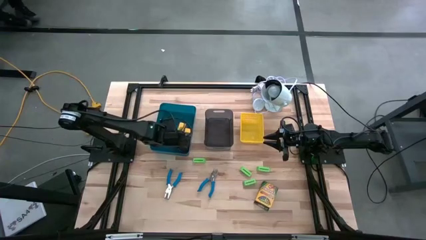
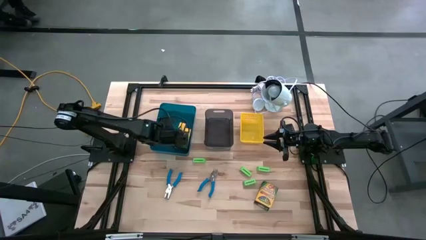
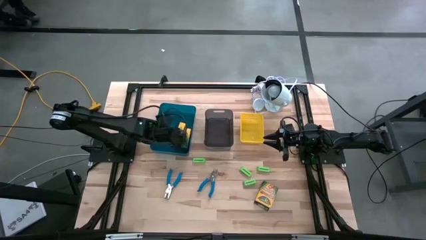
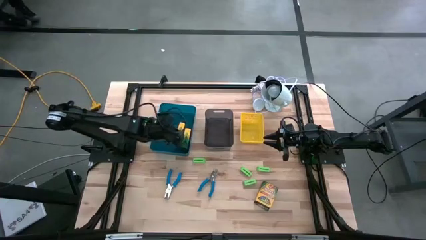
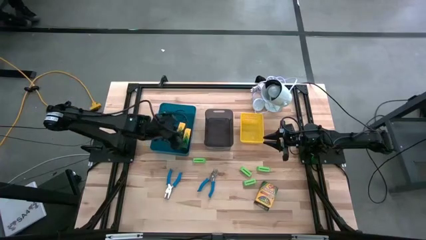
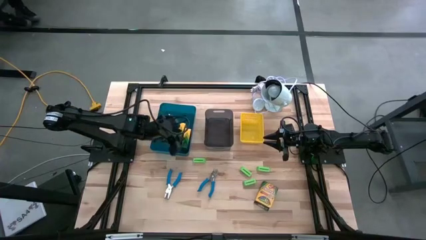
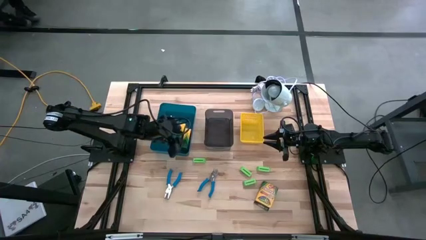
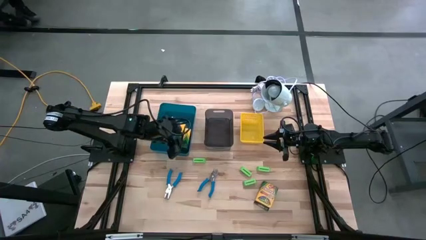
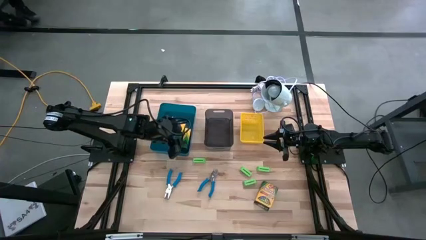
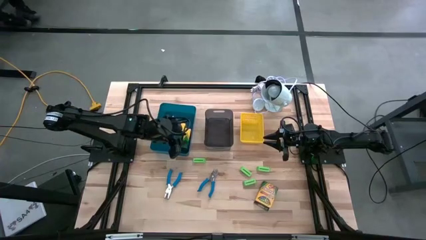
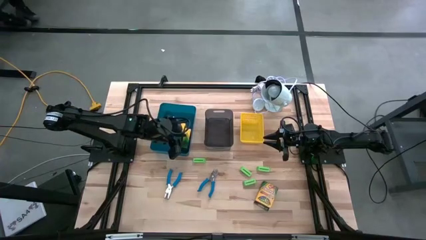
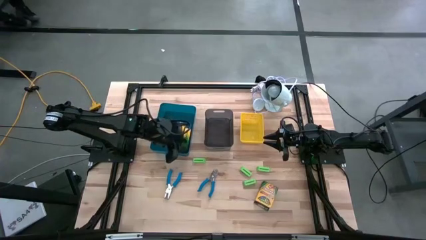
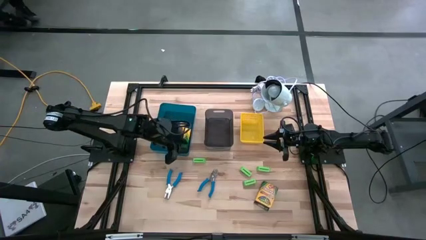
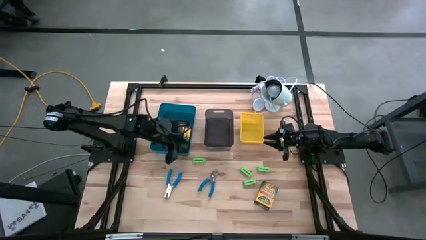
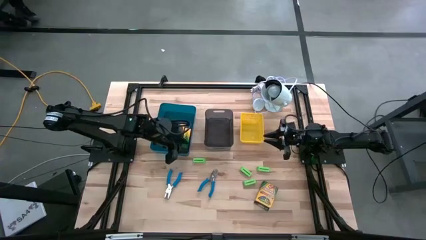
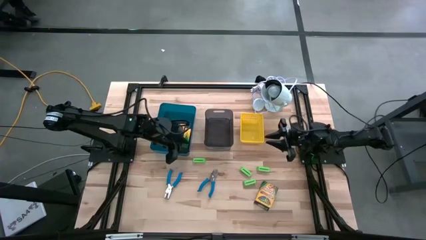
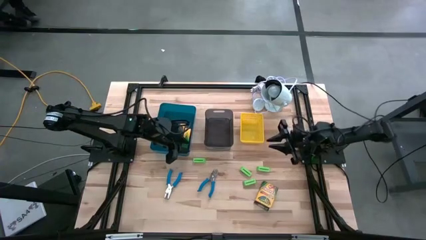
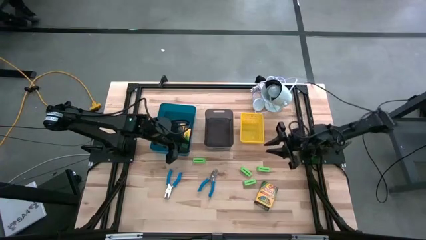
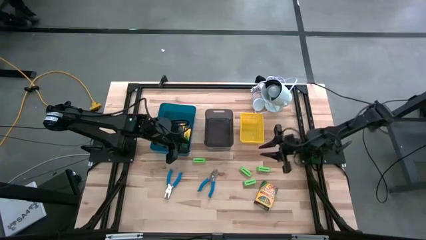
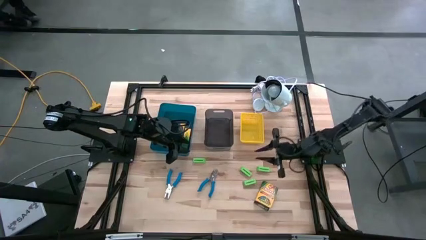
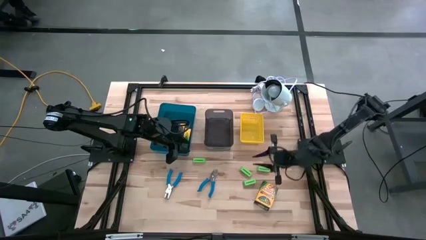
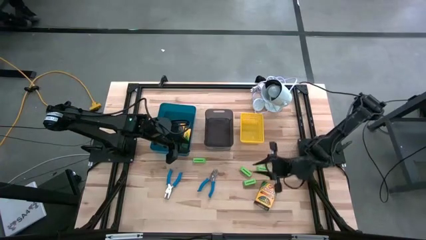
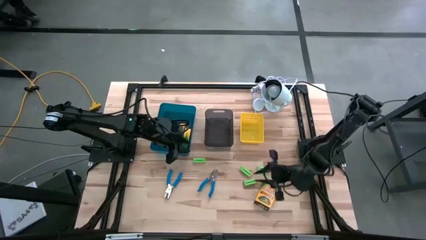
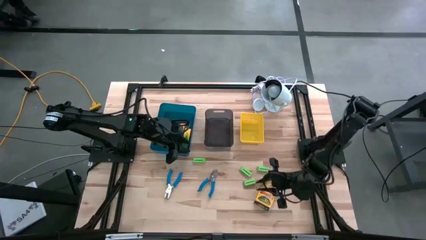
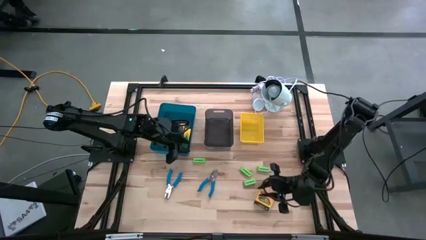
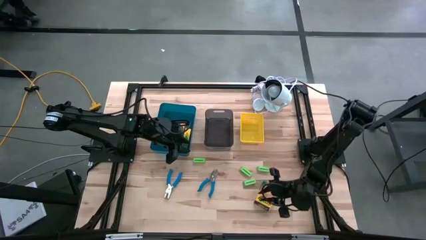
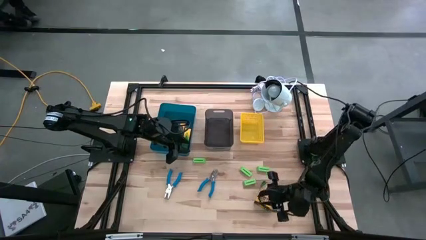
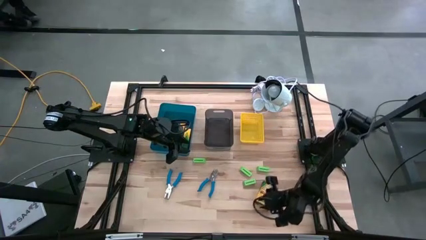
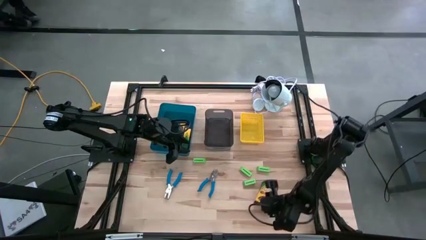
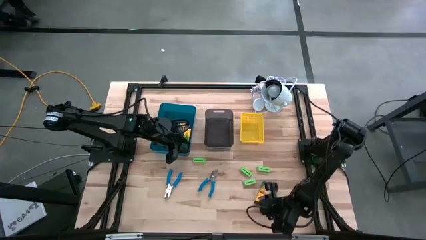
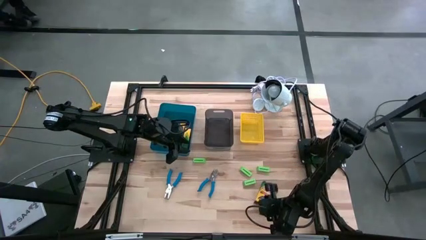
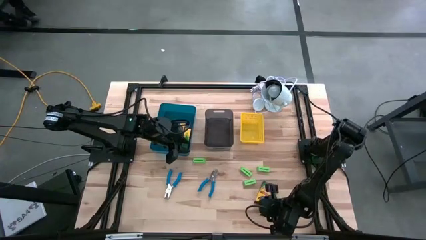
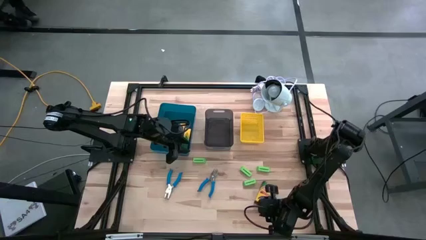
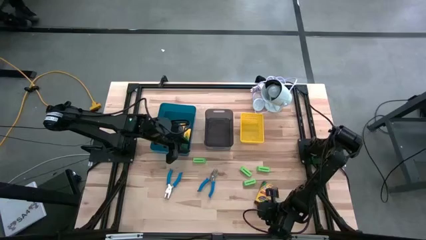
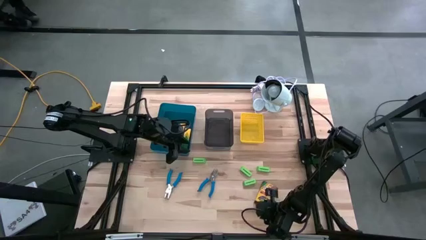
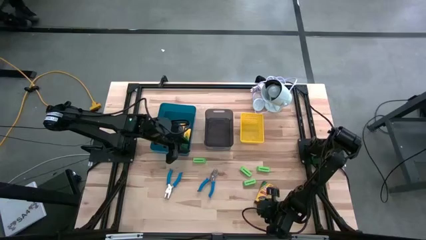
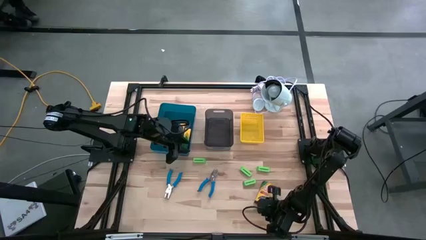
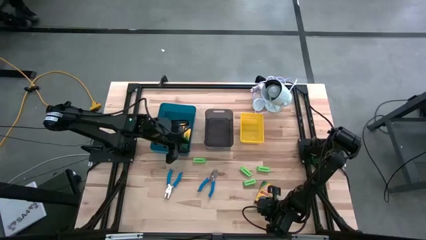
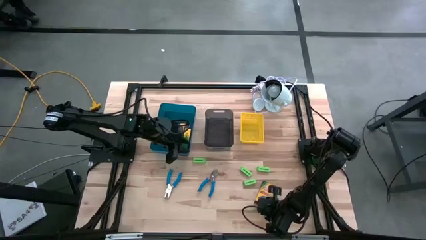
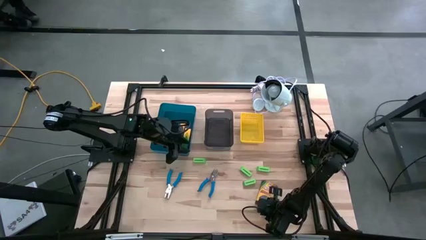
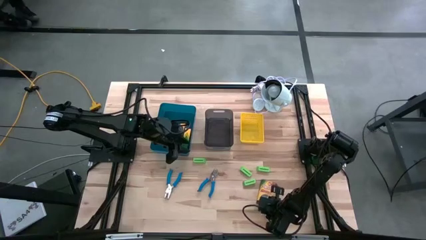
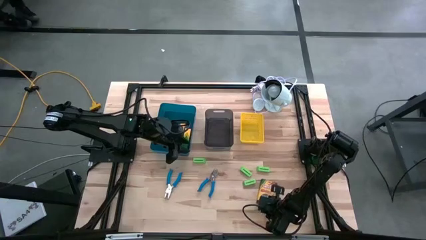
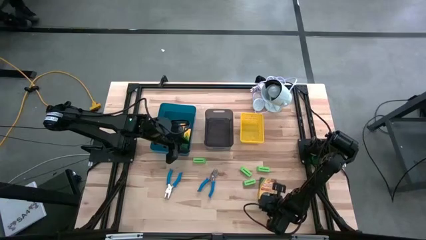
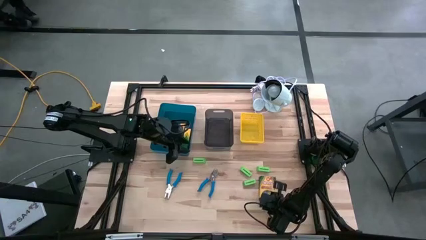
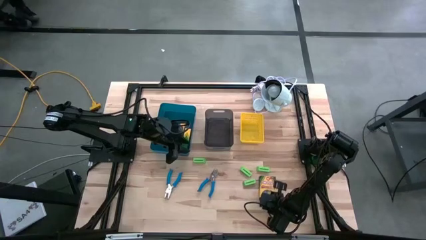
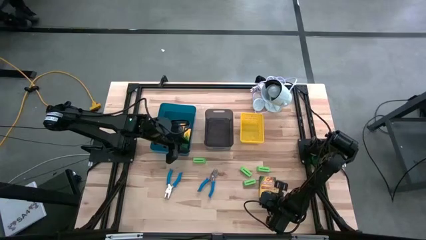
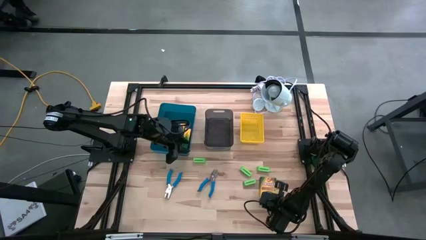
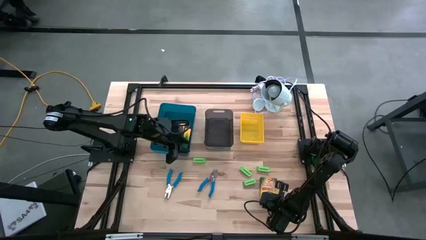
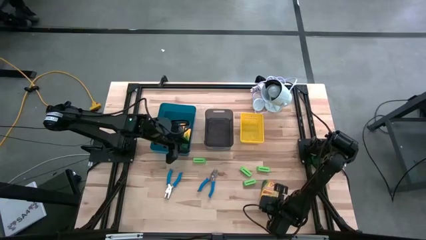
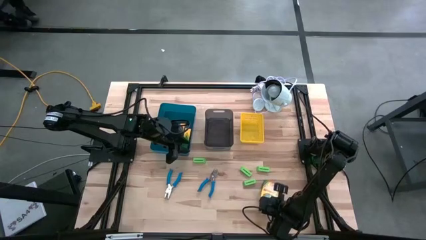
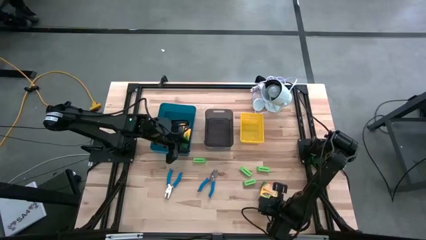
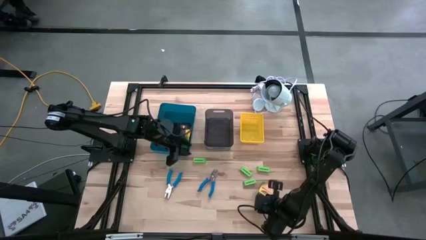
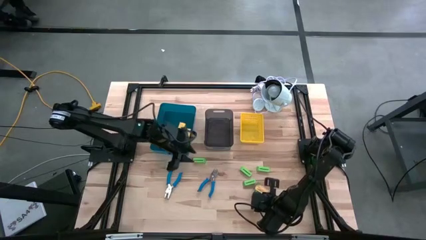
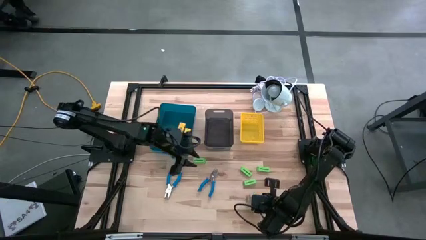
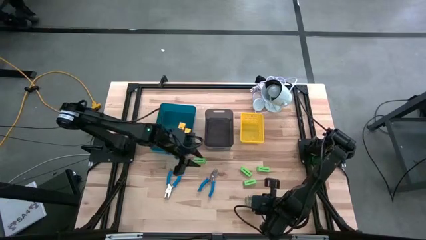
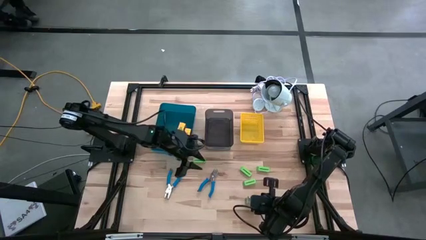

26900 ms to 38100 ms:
Task: Pick & Place School Supplies
Put the crayon box into the blue bin
